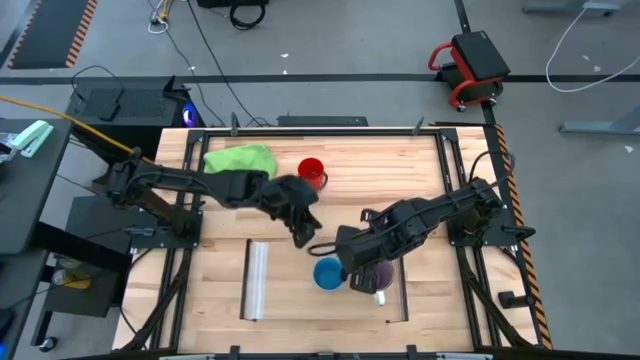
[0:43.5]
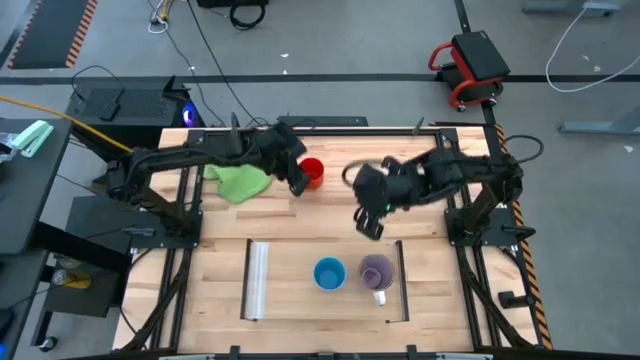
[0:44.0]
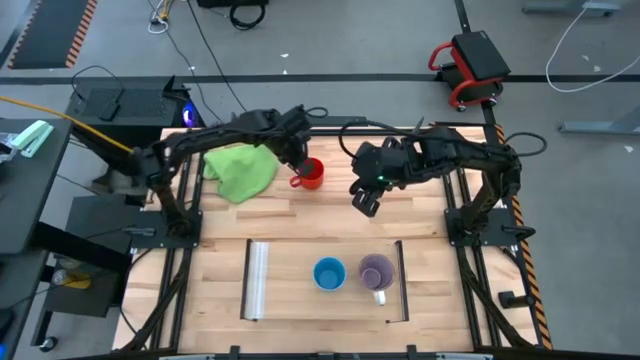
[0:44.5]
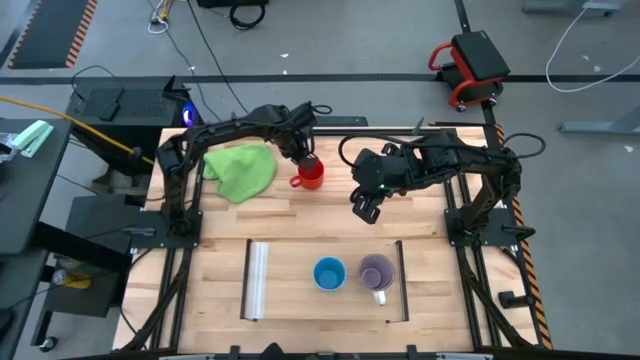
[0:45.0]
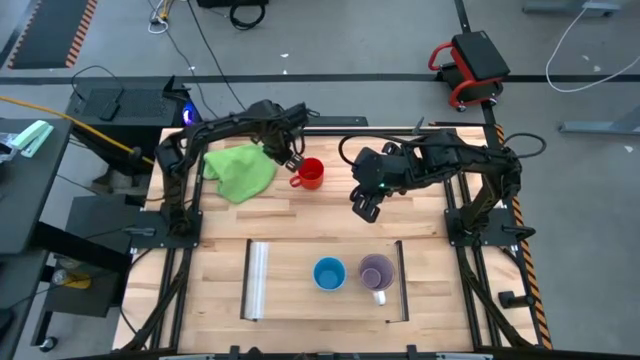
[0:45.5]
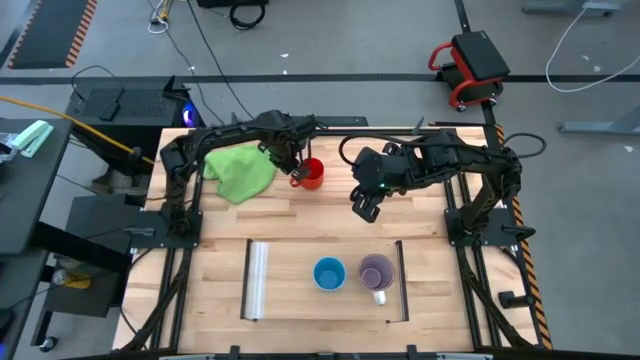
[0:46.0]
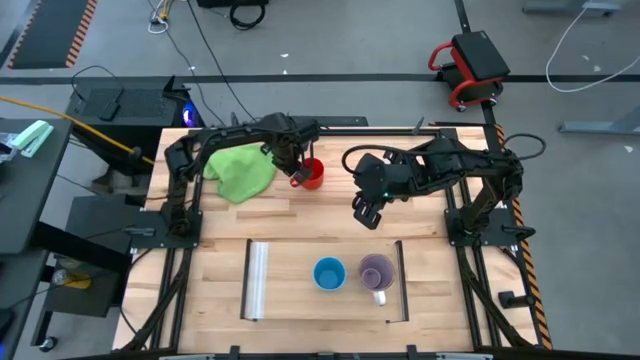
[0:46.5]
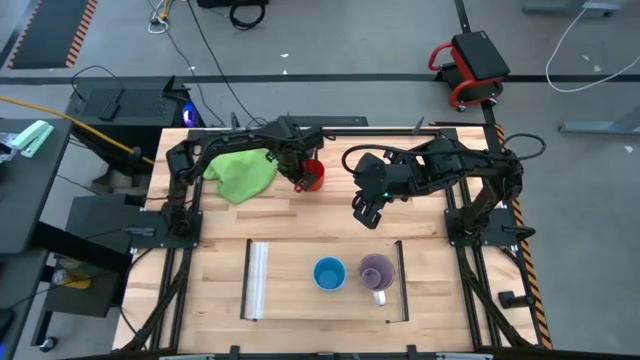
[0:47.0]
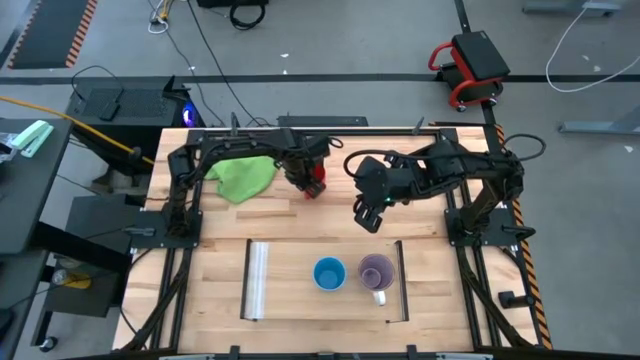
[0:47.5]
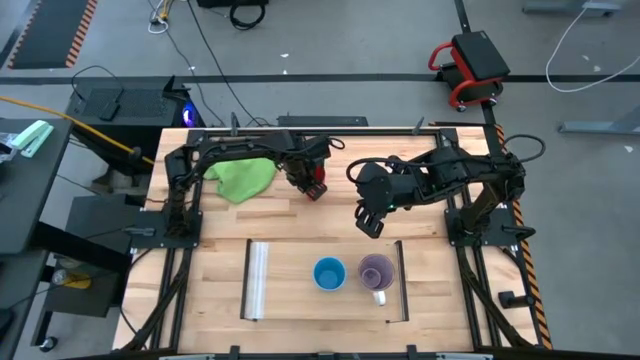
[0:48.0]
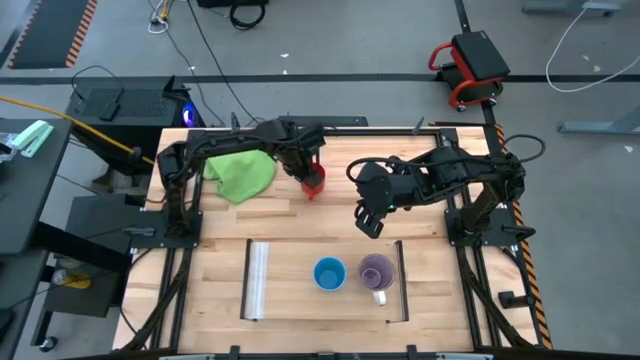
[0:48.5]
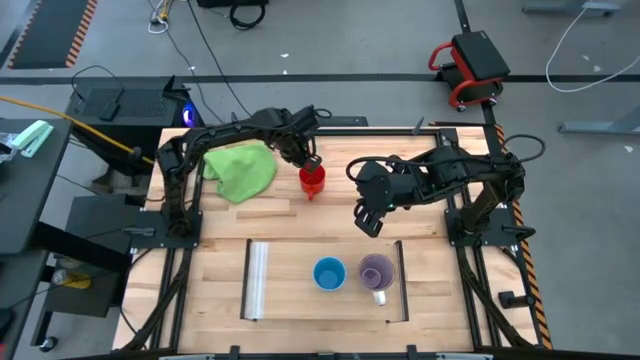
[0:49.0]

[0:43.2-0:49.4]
Task: Stack small to large cups/mugs on shelf
Prepare the red mug on the table

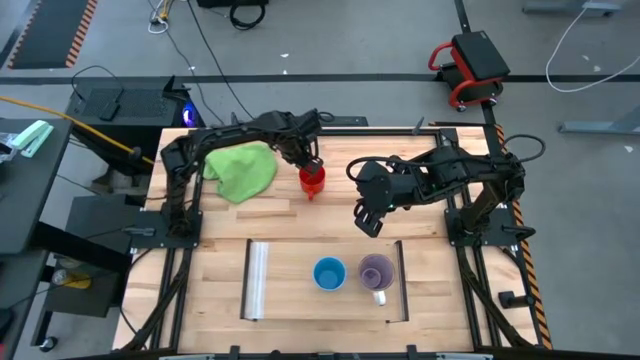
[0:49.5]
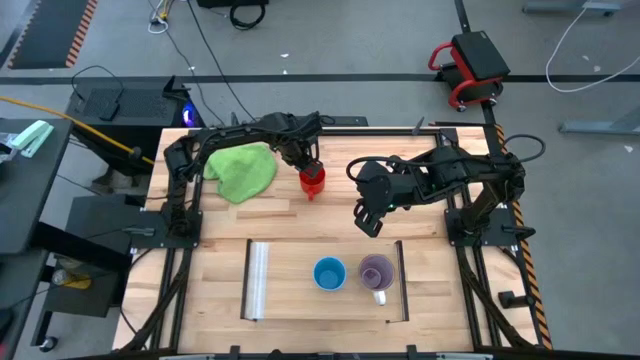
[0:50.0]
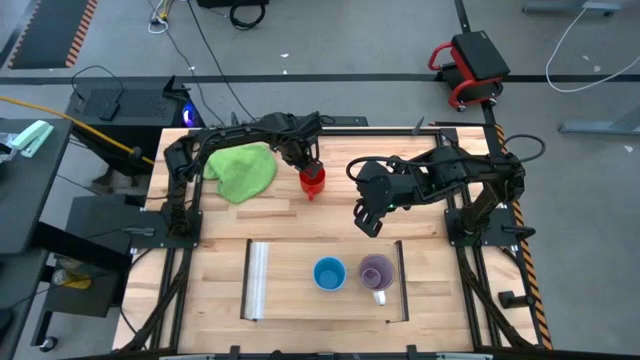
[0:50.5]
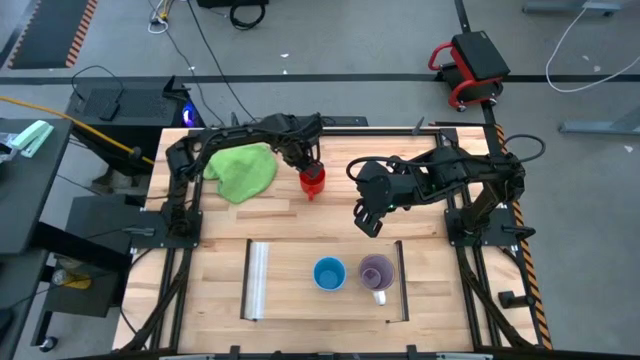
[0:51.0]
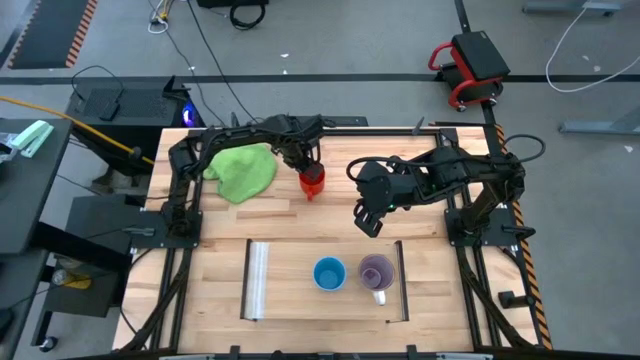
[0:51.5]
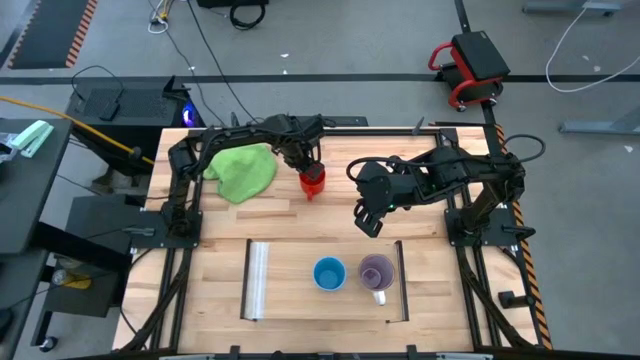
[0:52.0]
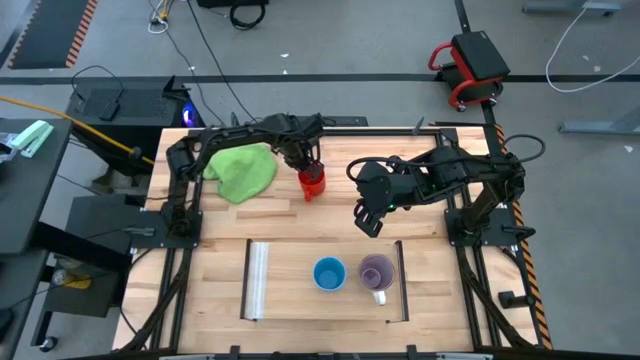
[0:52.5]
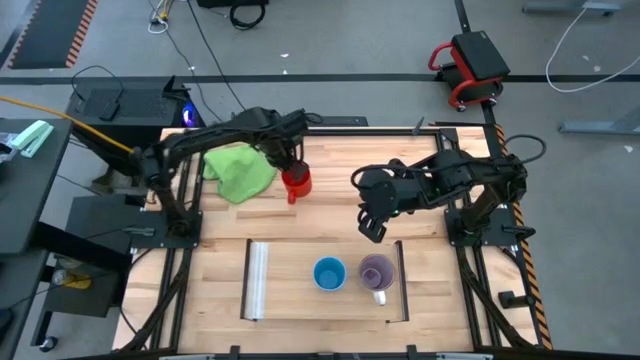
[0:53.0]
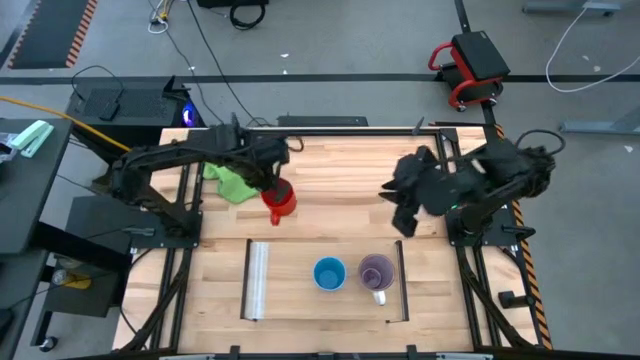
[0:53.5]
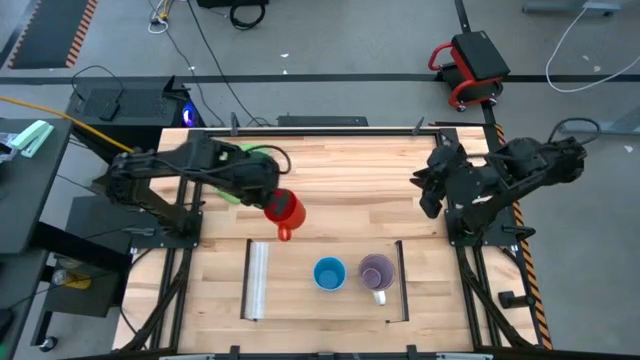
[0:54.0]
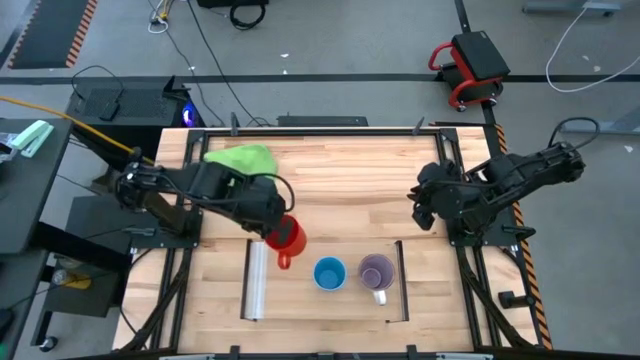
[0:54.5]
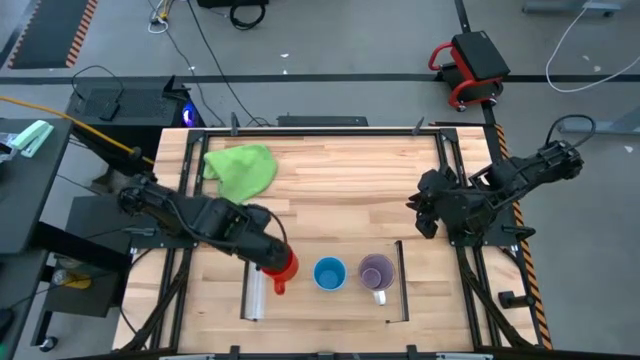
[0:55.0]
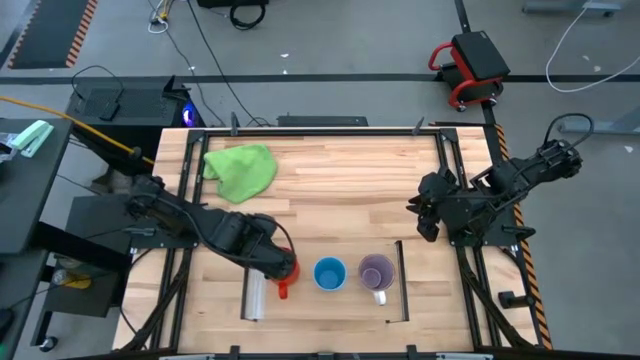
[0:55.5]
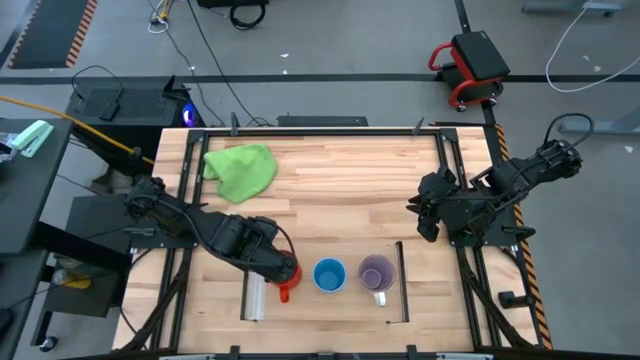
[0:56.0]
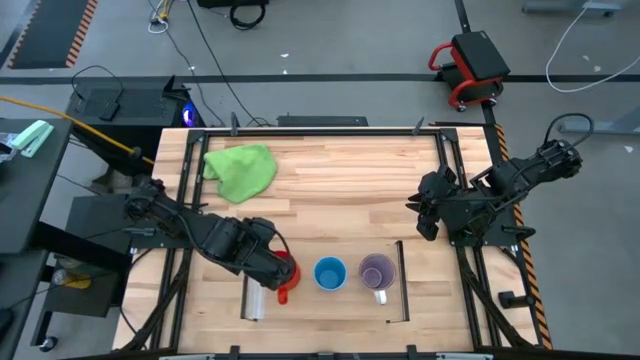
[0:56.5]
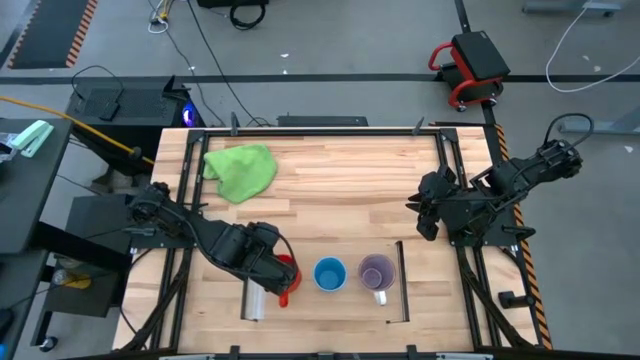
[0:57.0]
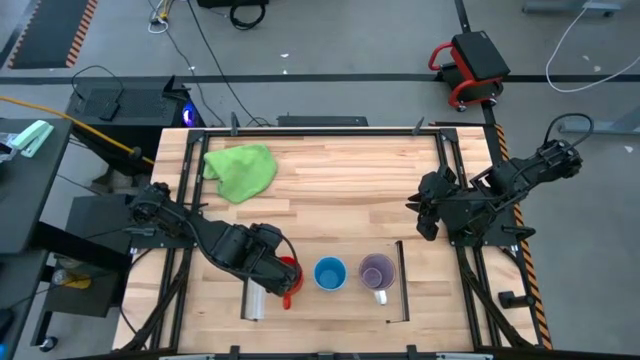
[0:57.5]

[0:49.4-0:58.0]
Put the red mug on the shelf

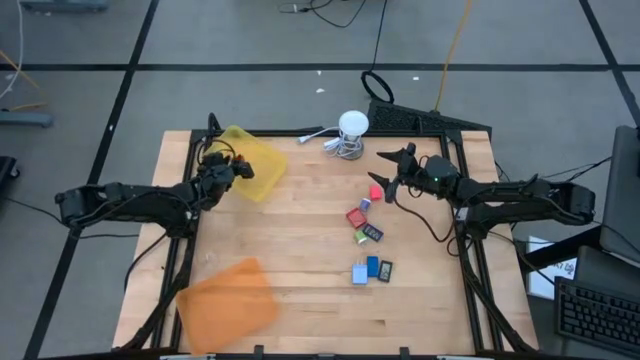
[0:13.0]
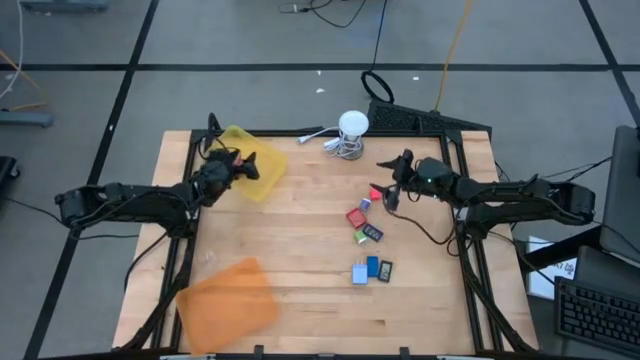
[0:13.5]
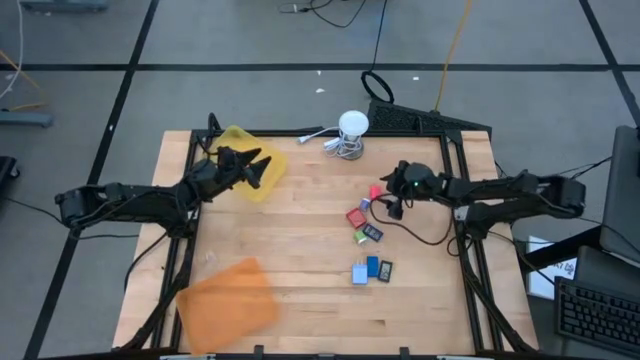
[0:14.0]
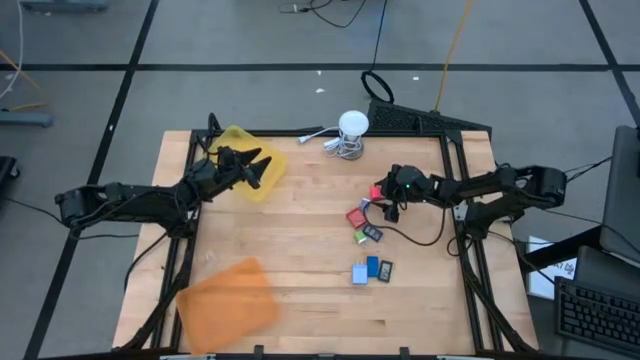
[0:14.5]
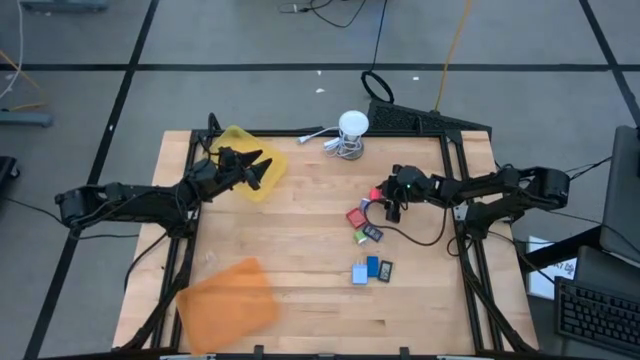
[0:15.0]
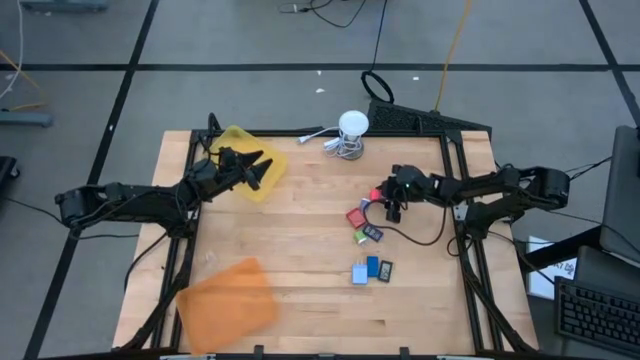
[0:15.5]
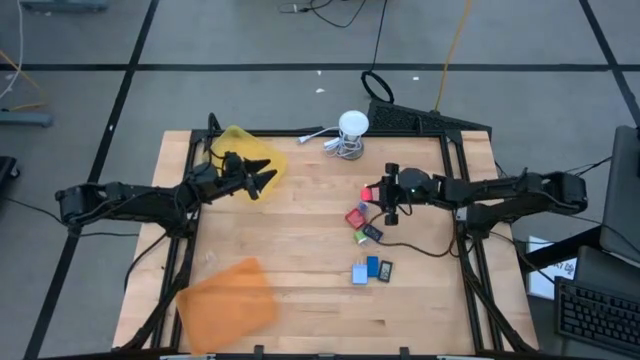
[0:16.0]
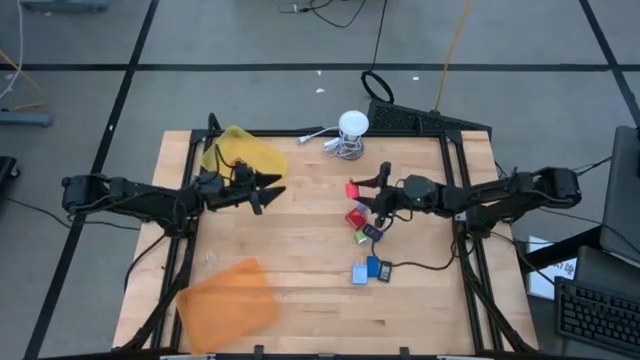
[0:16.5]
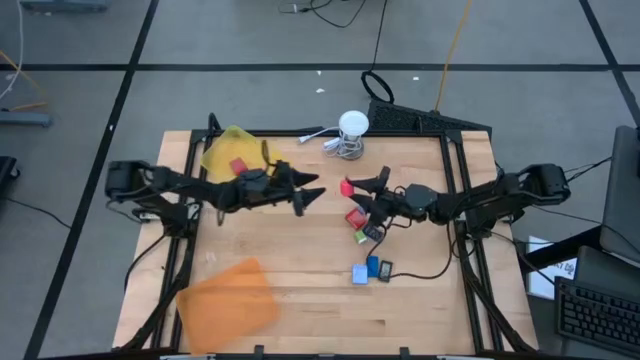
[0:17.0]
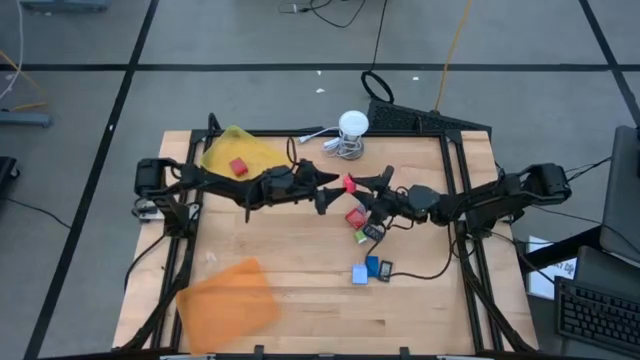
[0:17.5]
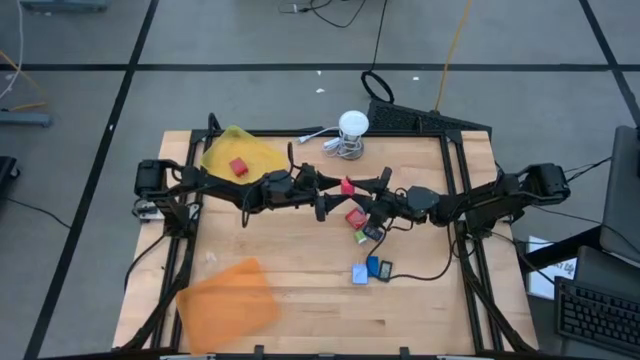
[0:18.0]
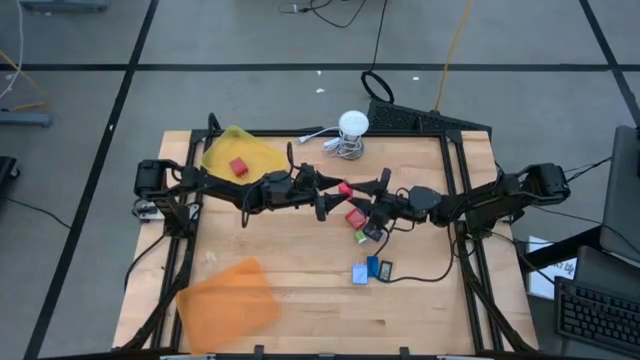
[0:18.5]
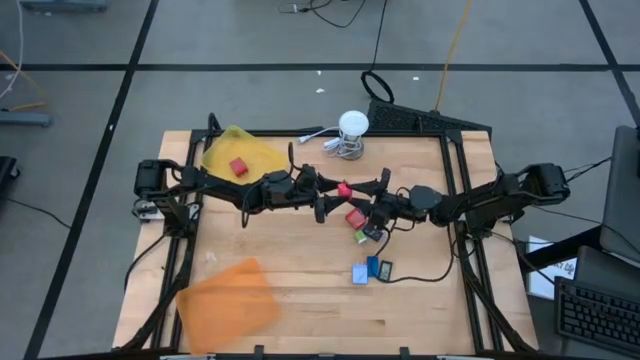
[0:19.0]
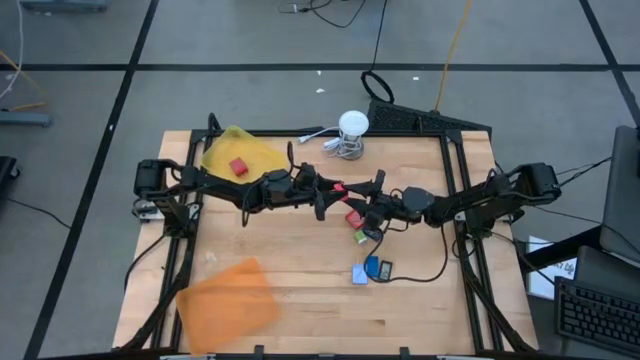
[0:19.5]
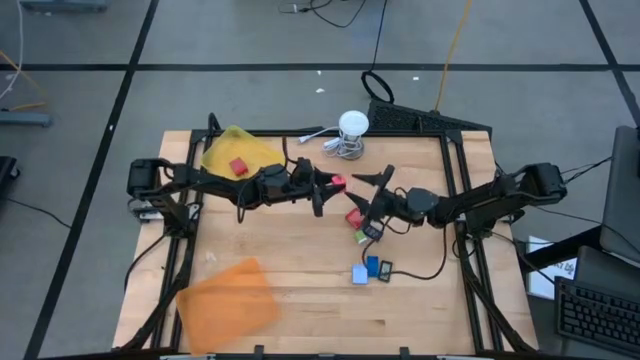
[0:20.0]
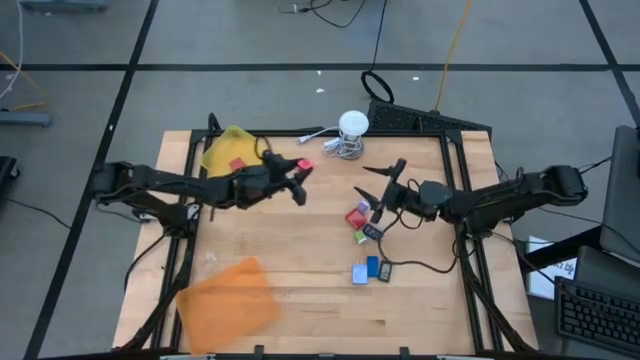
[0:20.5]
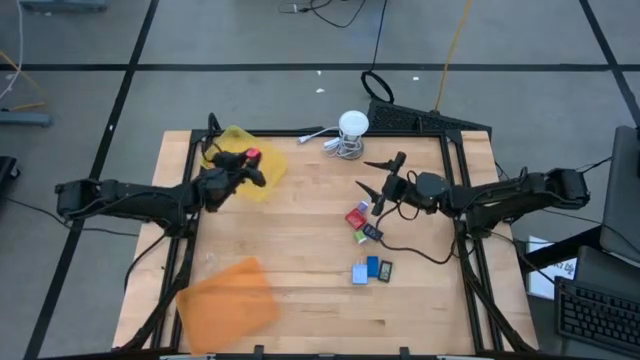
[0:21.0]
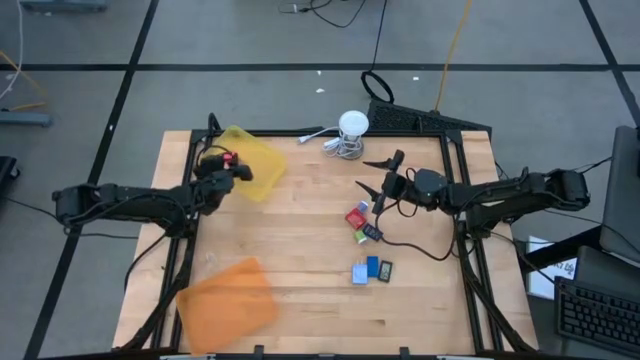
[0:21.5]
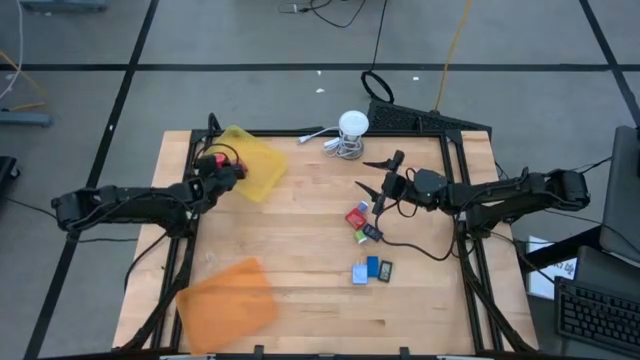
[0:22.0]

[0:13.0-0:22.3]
Task: Pick & Place Office items
Put the pink charger adapter into the yellow bin
